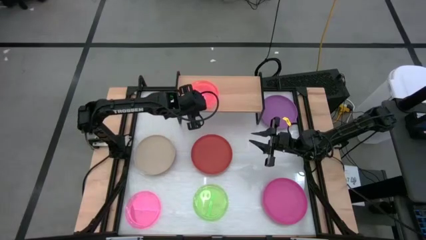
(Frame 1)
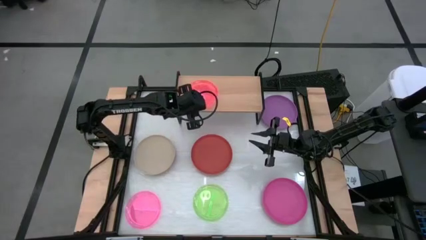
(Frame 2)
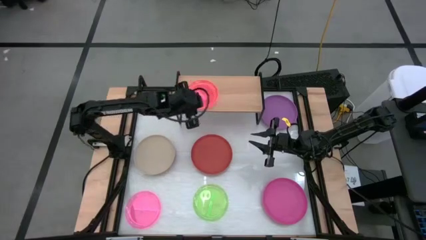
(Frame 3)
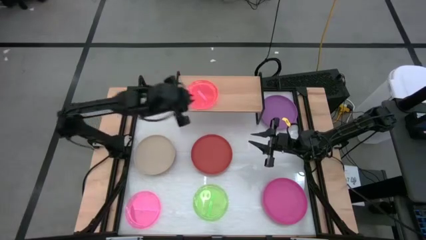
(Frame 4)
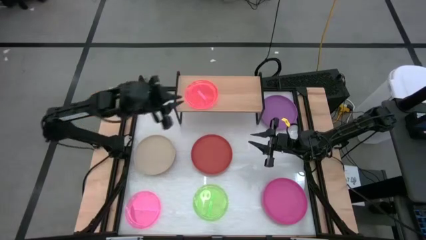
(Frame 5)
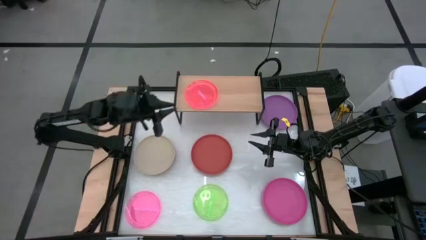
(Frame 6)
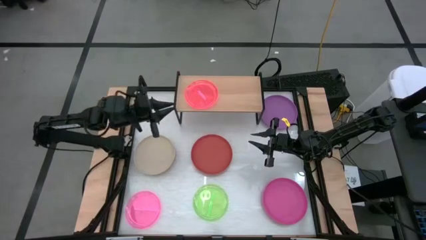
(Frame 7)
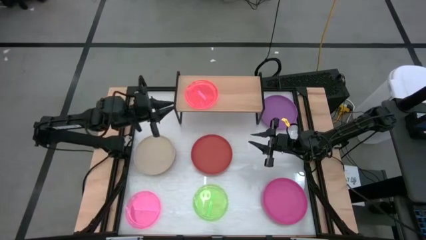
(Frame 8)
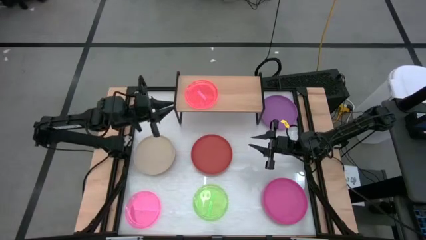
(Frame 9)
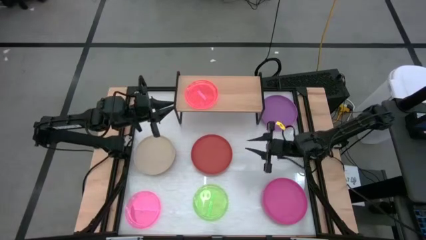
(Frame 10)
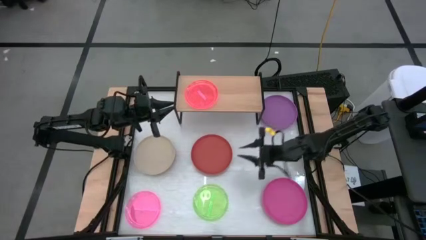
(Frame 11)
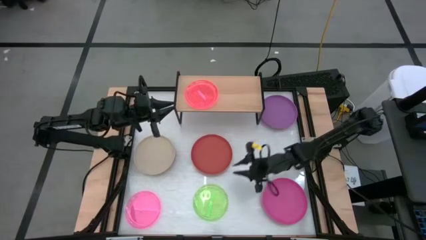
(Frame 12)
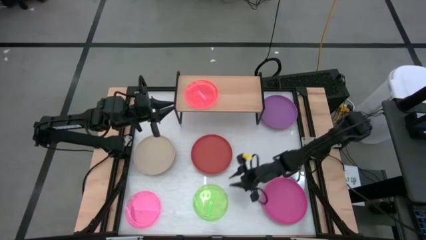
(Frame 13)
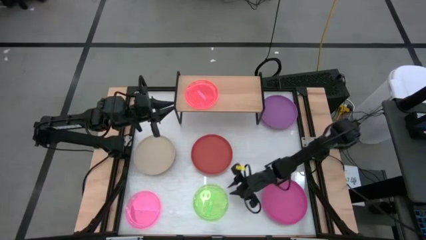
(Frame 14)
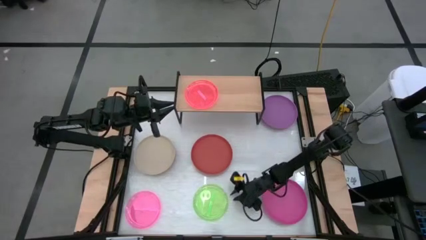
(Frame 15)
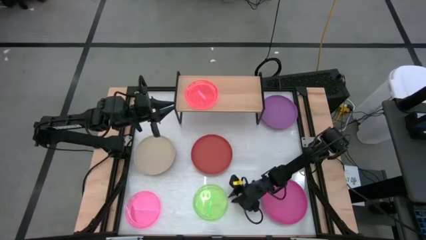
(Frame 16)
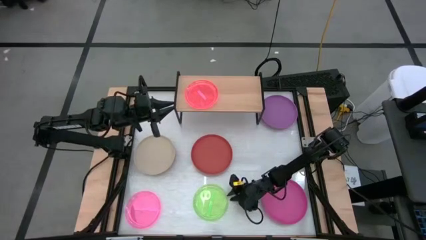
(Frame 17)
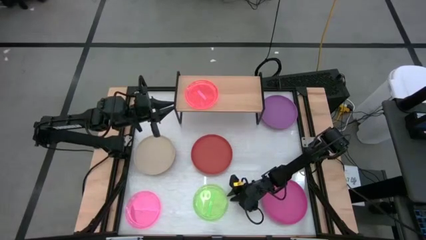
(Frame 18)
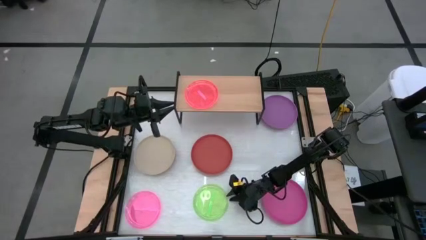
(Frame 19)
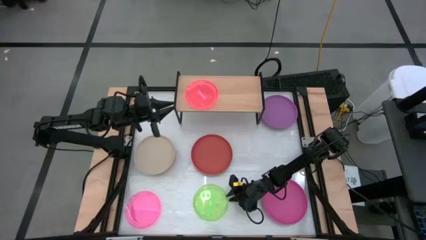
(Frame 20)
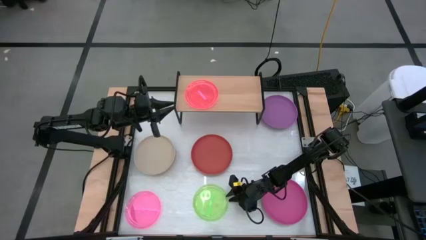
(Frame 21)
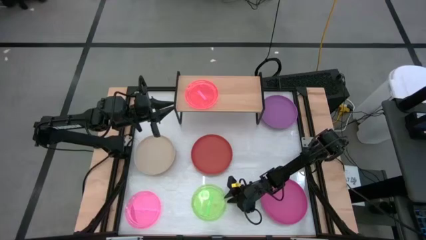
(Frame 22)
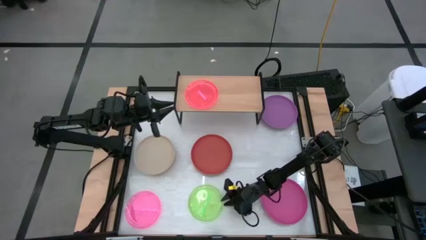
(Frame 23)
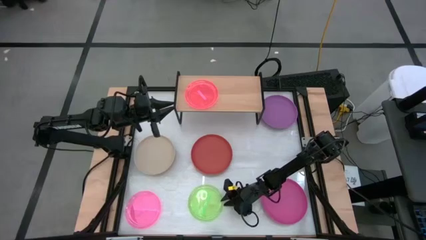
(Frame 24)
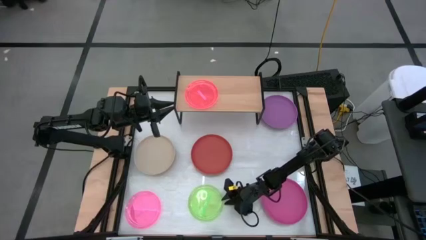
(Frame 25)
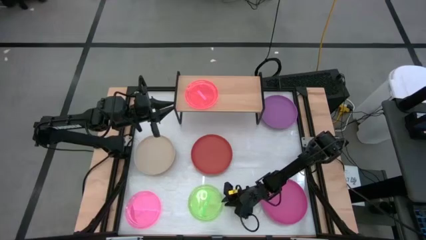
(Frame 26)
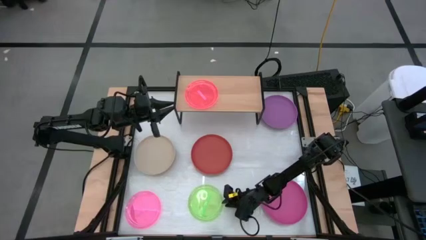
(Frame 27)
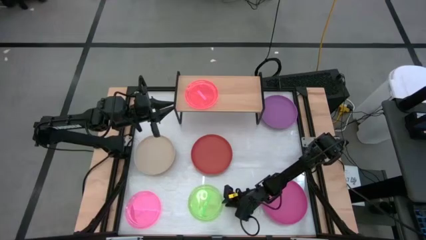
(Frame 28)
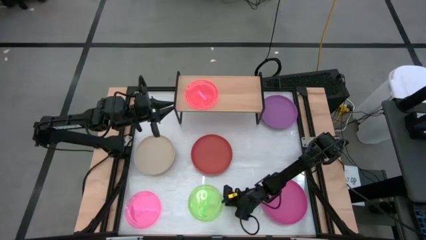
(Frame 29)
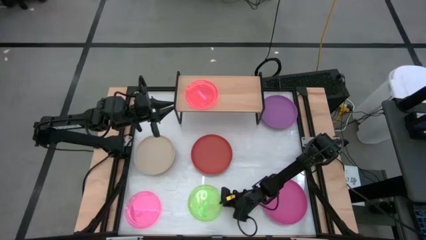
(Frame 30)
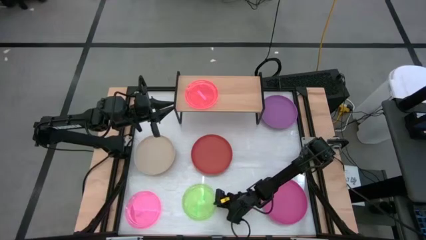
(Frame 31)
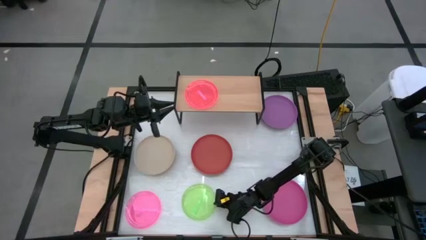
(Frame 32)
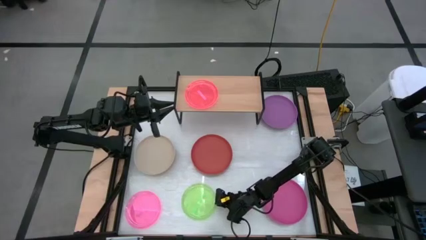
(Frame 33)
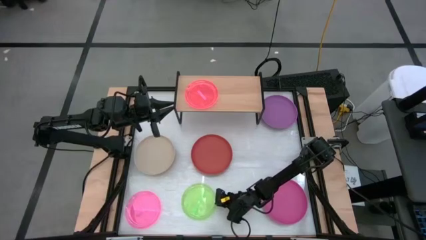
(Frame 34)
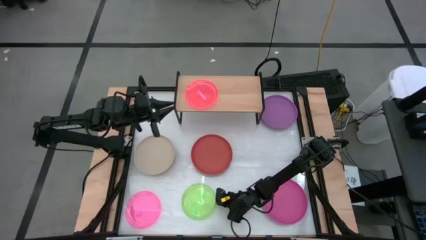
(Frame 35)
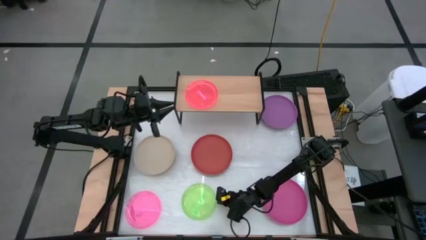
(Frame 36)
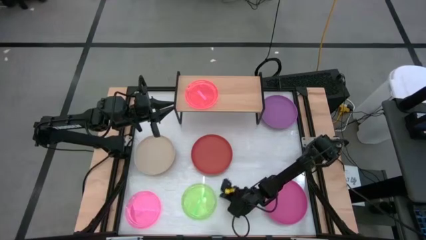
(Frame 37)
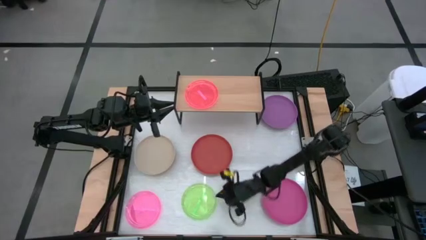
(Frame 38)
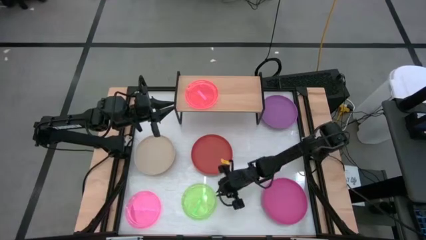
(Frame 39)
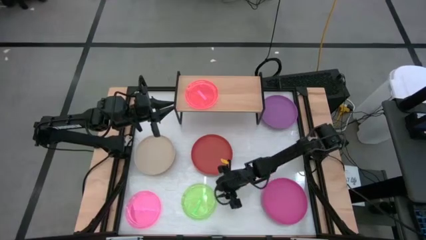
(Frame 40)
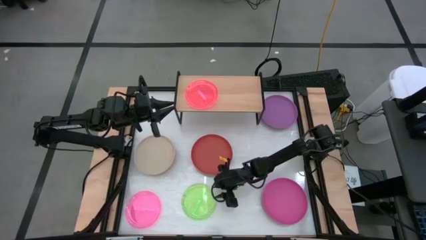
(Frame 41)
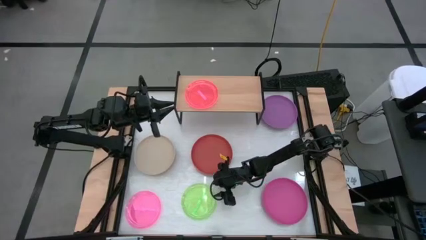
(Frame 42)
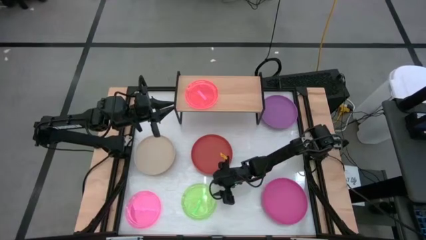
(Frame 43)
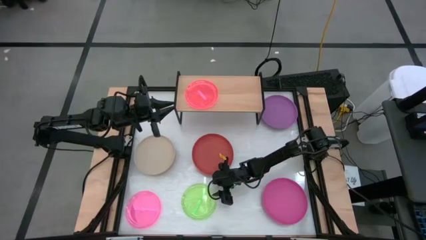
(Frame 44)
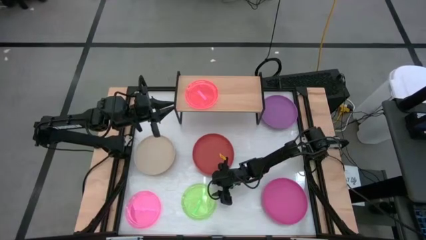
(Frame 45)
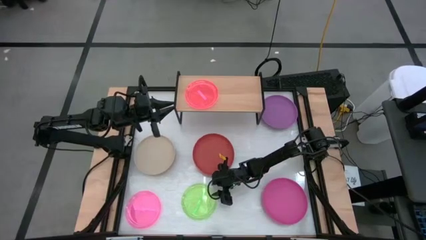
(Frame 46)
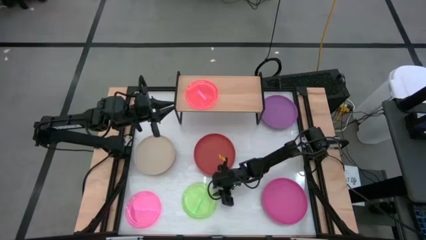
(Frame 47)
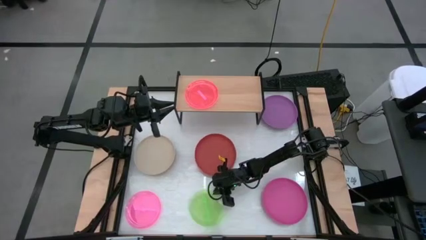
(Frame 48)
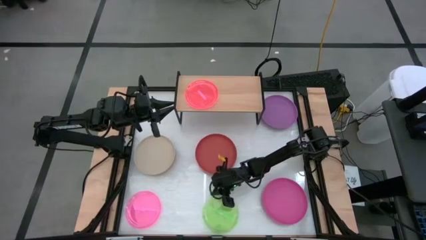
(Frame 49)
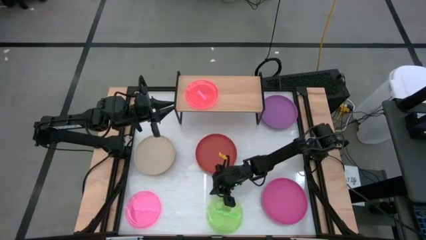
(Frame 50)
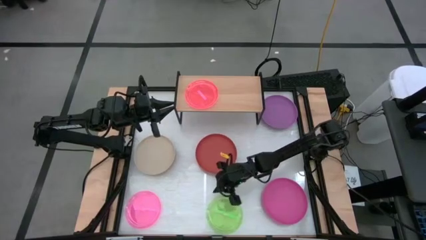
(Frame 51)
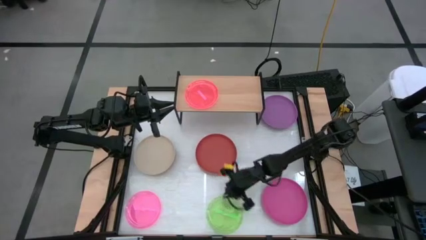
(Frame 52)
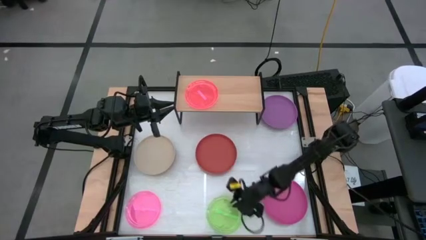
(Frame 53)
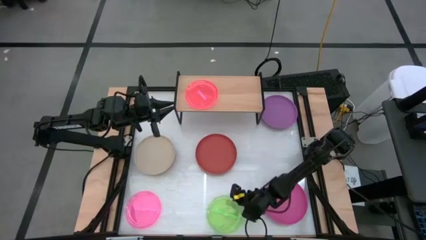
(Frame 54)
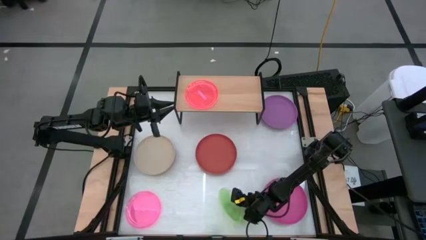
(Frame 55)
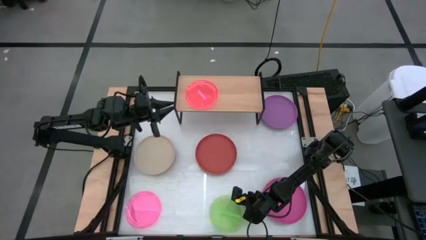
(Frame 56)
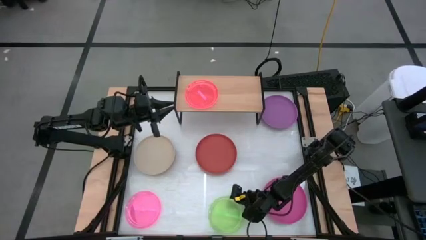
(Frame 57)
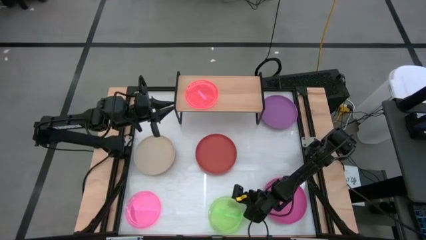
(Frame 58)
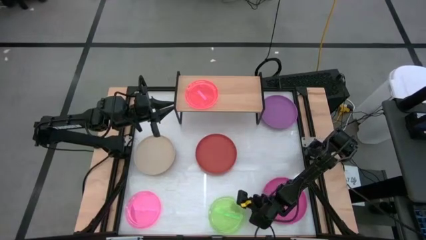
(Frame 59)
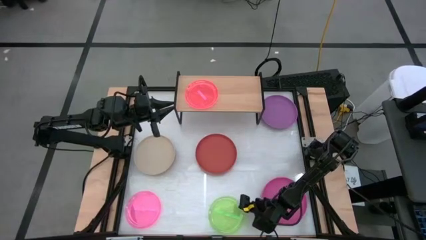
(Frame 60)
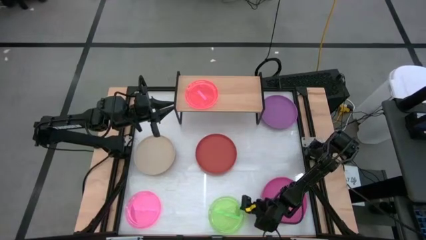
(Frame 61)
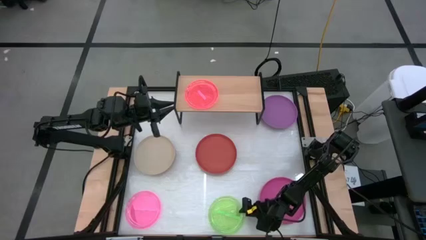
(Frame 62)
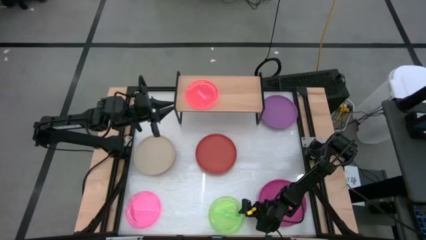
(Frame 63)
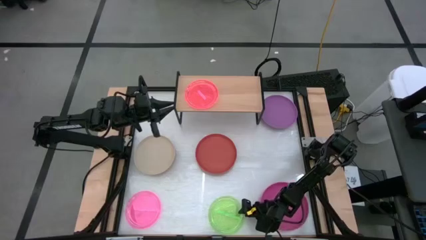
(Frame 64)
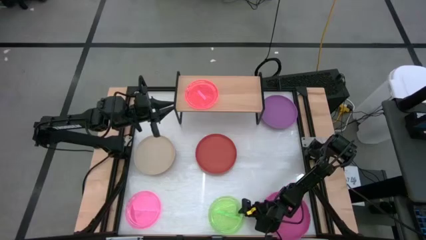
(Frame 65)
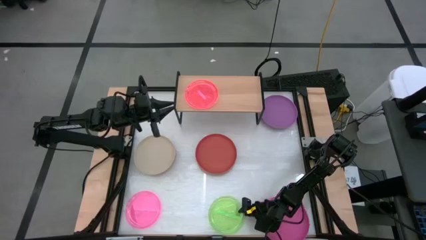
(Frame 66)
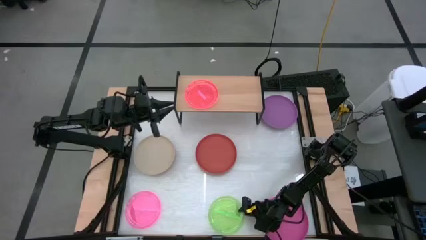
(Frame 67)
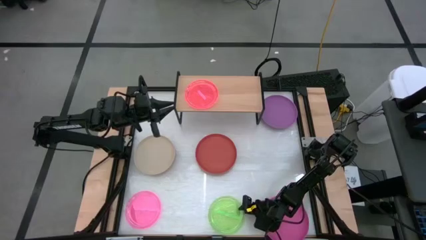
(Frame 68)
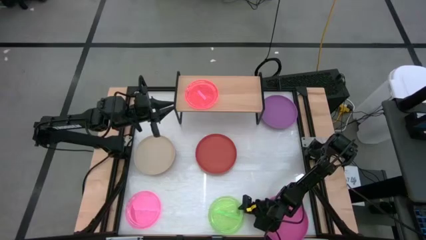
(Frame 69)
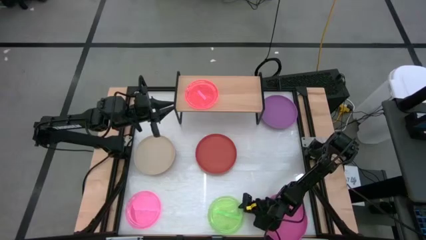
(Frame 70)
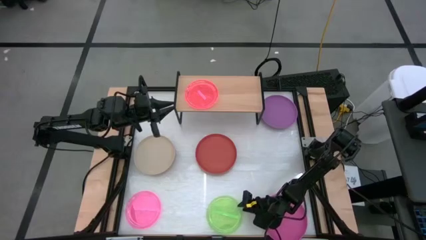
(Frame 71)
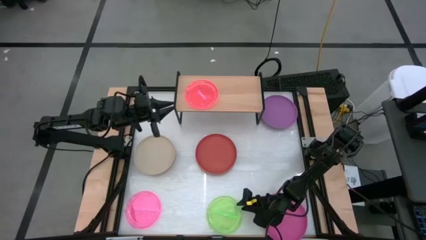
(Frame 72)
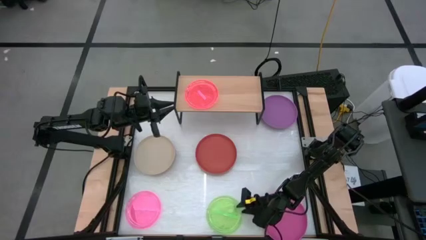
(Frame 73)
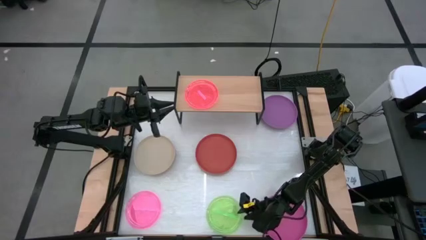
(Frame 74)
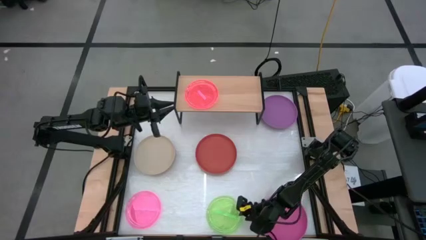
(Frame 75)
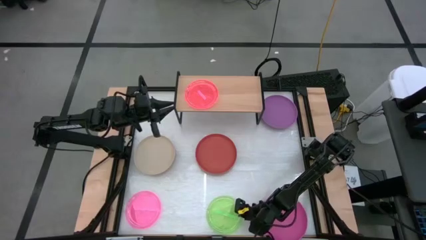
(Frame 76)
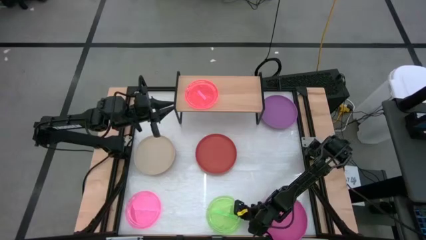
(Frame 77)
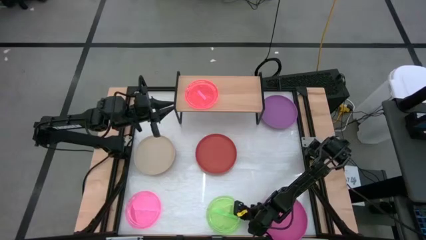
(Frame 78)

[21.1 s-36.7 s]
Task: Place and stack plates onto a shelf
Stack the small green plate on top of the small pink plate on the shelf

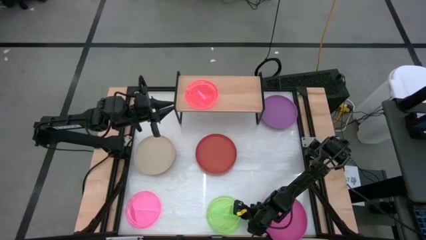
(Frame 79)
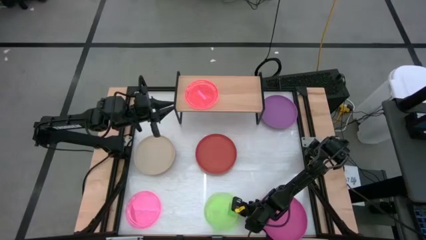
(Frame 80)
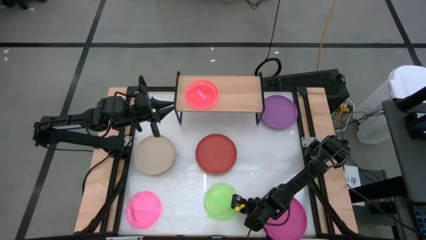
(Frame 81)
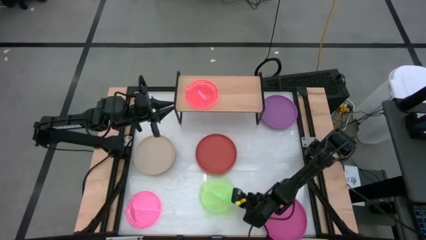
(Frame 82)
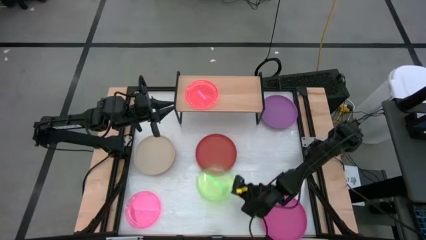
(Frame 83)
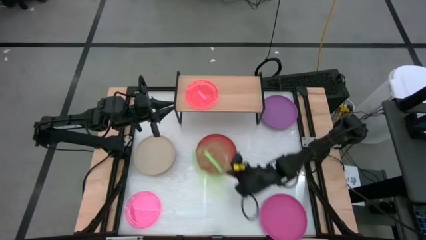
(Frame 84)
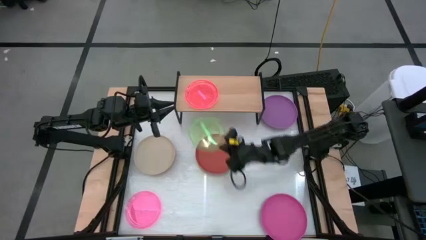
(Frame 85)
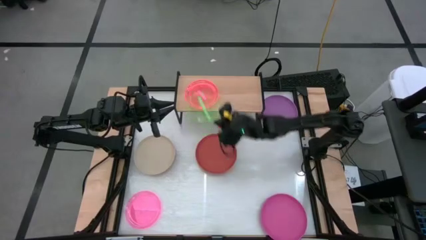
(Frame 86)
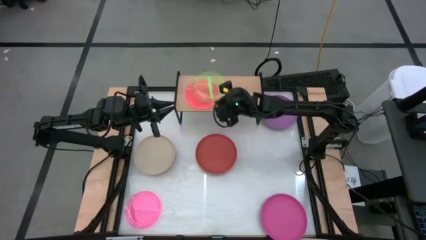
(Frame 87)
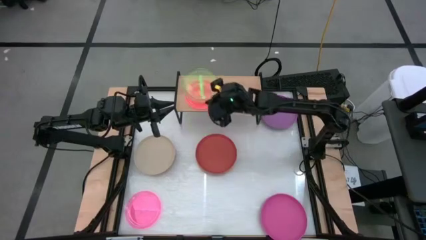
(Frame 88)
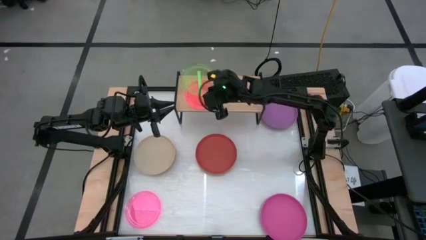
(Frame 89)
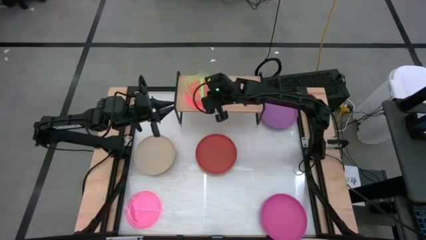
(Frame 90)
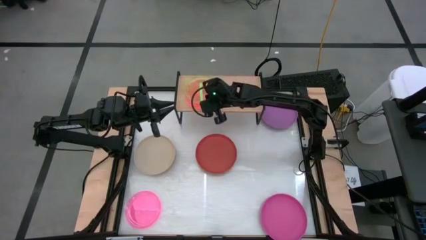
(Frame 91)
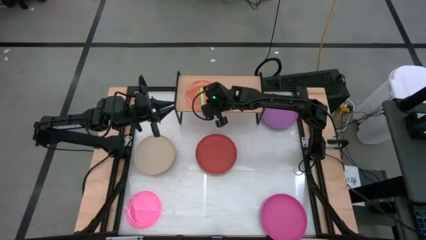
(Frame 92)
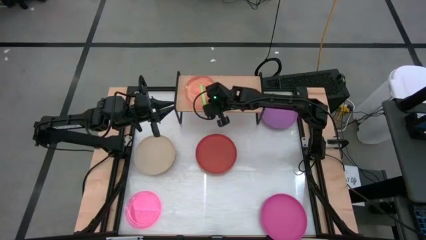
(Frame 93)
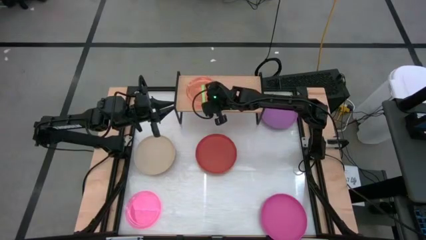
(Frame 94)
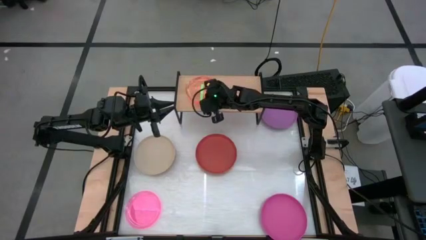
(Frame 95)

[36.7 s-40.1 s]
Stack the small green plate on top of the small pink plate on the shelf
